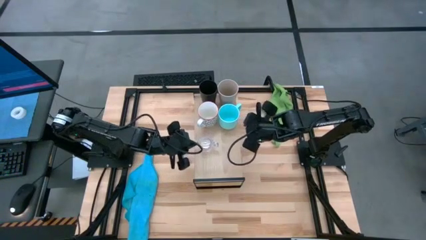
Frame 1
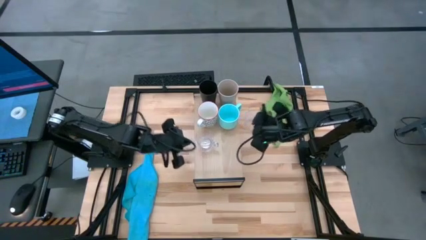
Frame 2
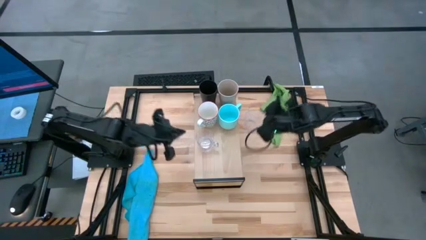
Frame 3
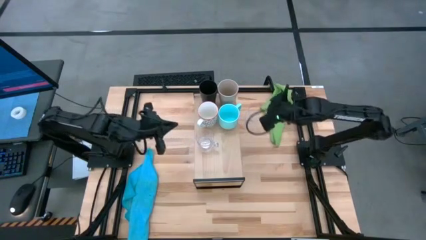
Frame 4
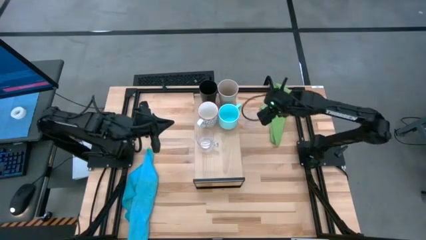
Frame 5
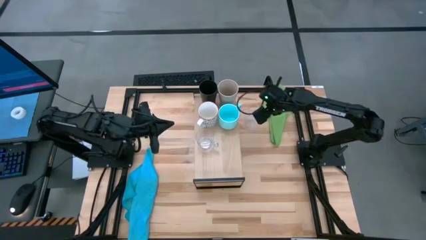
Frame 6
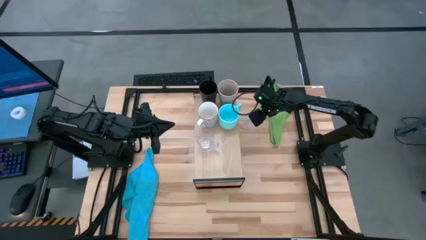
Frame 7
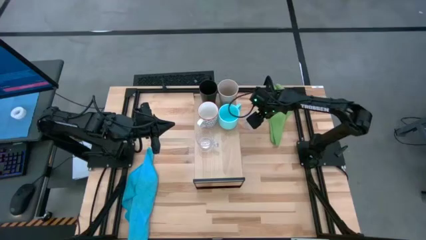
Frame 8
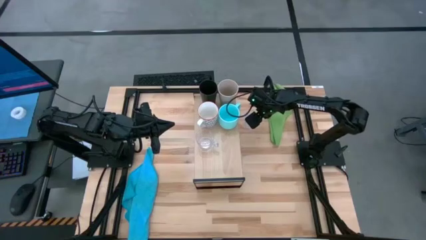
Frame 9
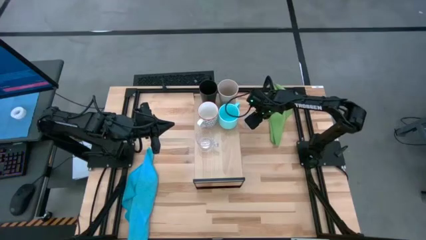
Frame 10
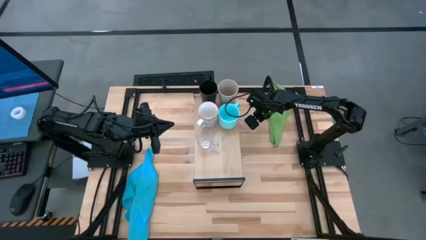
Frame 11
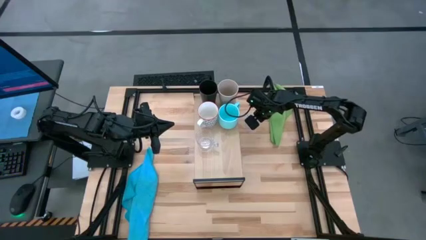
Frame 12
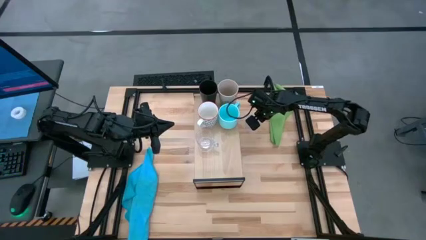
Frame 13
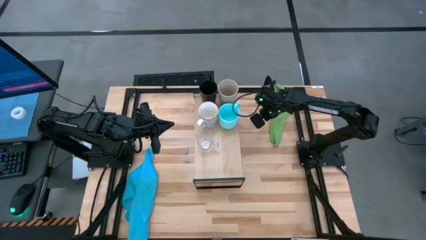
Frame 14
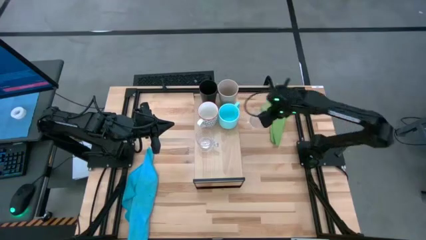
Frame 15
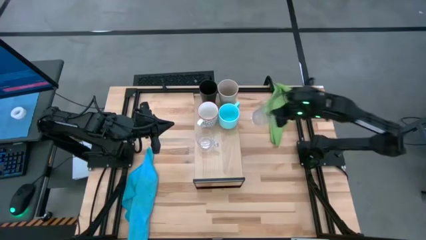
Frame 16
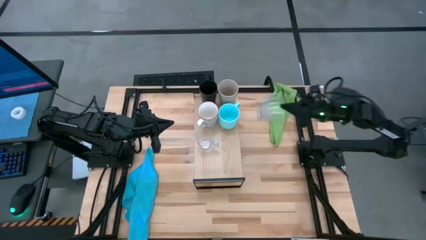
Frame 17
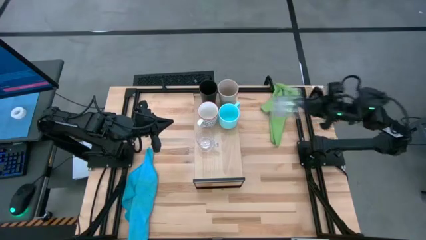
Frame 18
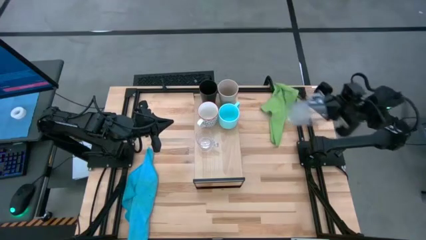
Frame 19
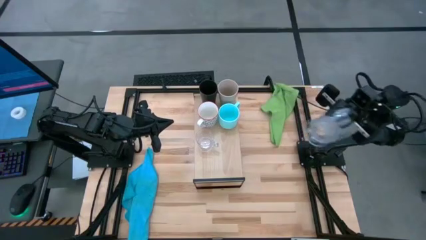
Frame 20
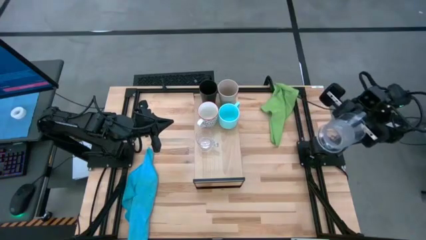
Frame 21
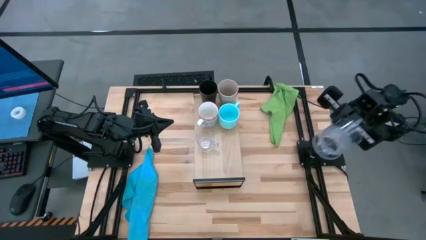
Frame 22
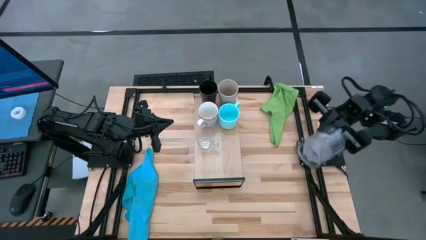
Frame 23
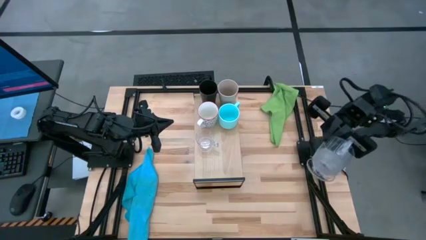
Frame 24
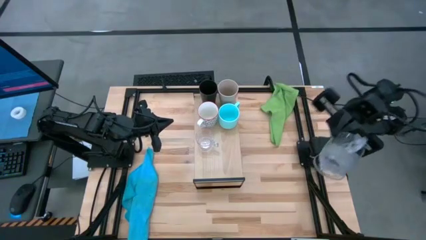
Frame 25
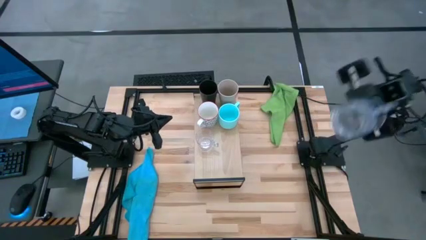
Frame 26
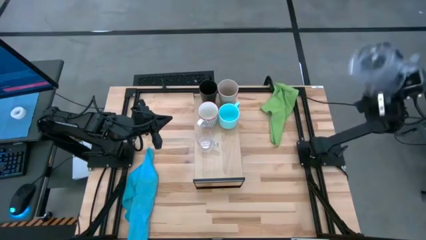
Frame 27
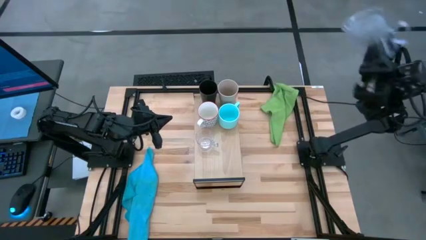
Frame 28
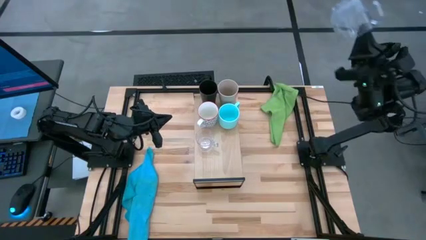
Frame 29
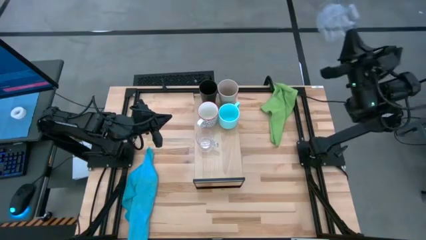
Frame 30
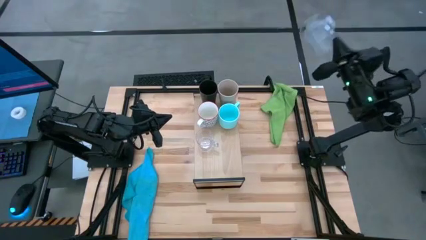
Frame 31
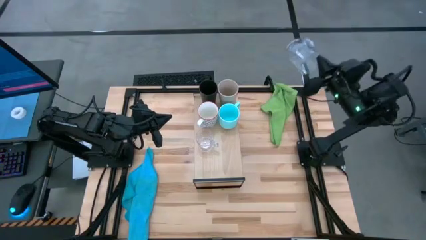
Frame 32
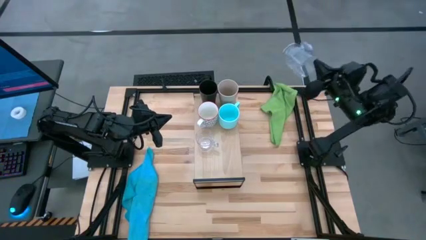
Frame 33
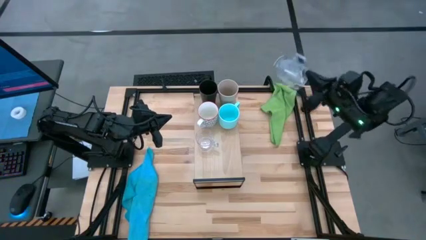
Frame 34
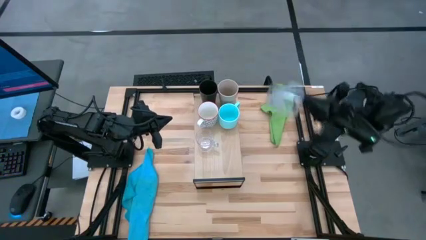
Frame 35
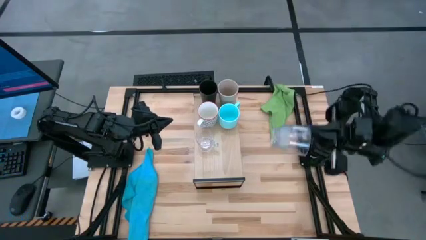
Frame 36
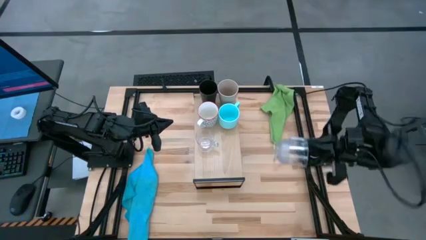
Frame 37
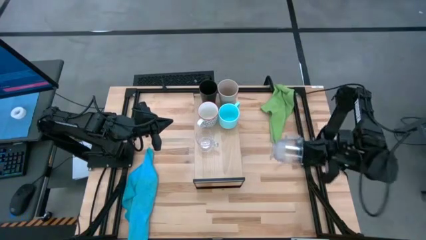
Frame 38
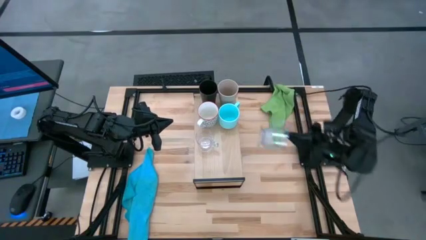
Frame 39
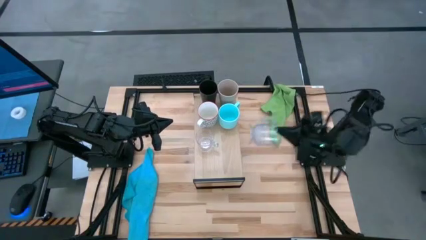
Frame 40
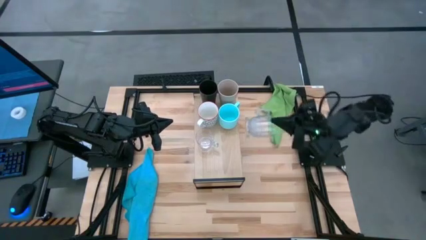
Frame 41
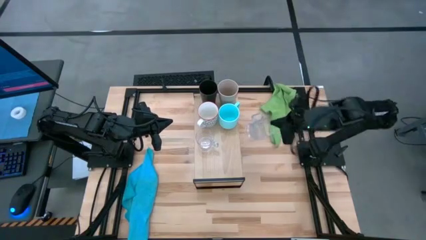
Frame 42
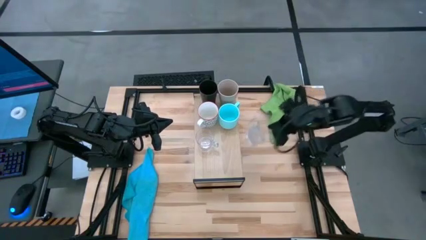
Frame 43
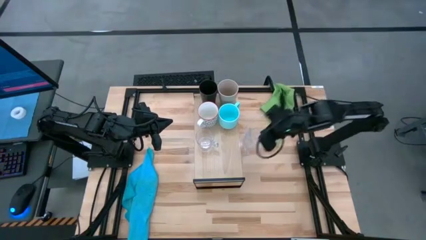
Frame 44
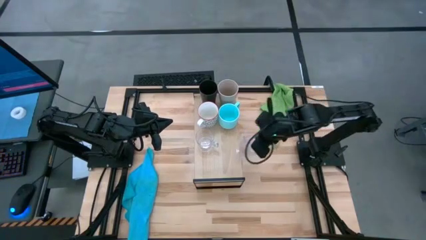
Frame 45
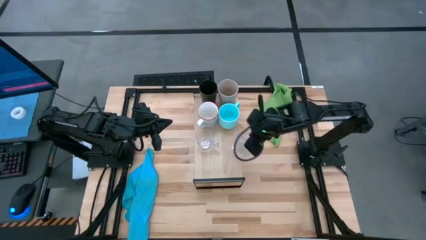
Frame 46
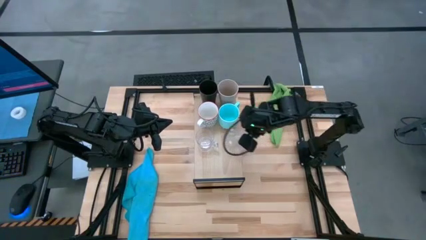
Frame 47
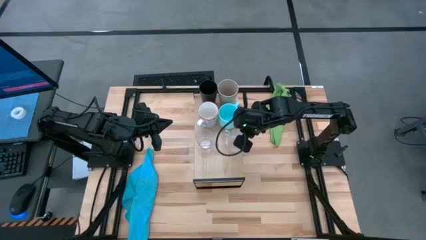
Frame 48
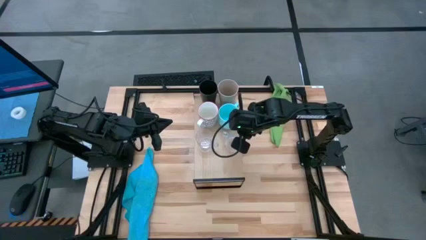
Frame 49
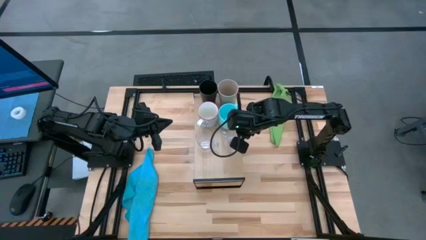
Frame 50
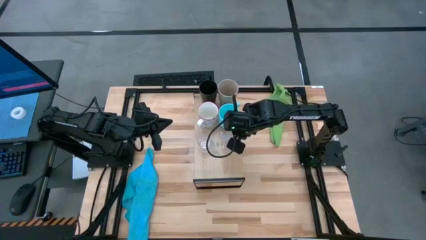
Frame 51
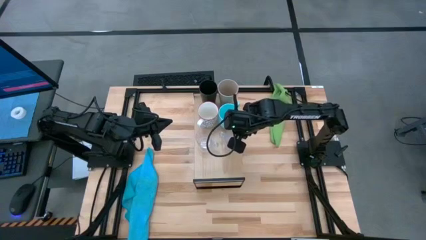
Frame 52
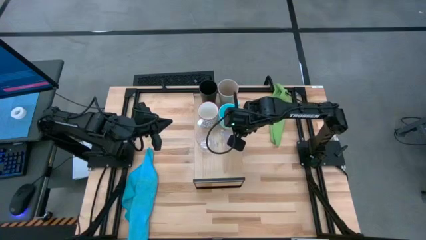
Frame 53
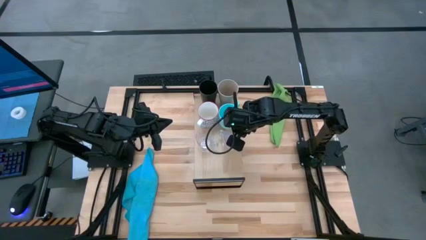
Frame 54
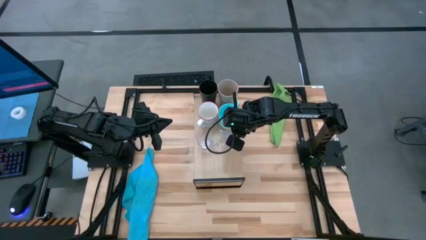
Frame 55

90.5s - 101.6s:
Task: Stack small to large cups/mugs on shelf
Put the transparent cup on the shelf

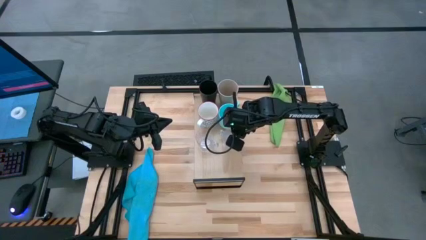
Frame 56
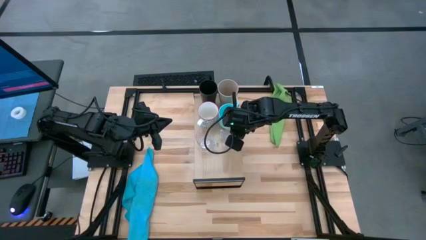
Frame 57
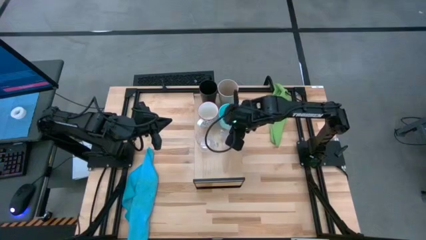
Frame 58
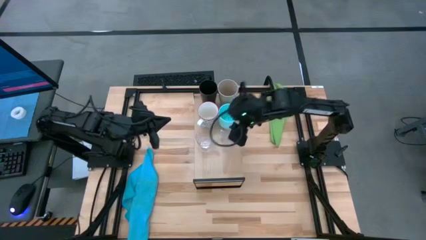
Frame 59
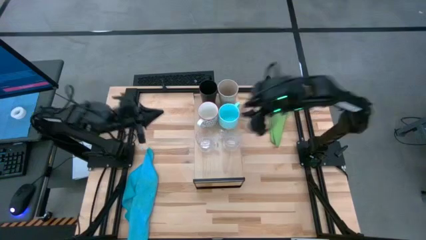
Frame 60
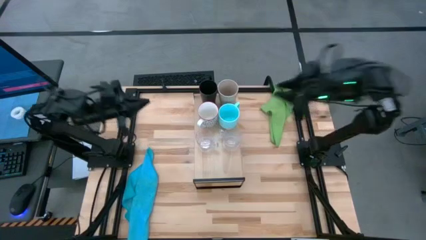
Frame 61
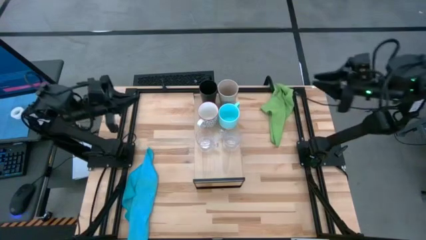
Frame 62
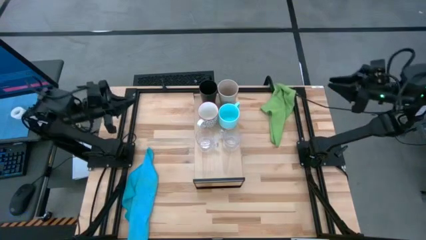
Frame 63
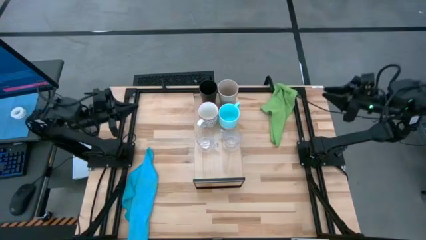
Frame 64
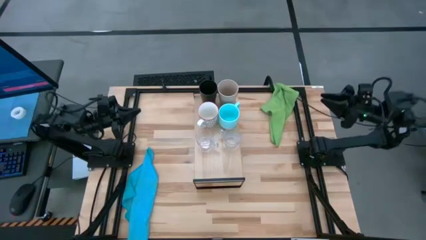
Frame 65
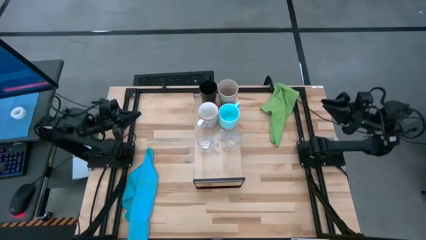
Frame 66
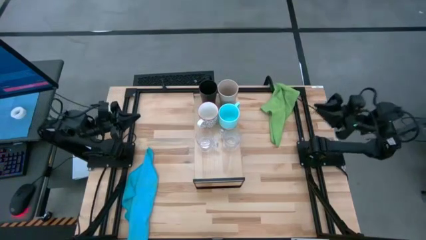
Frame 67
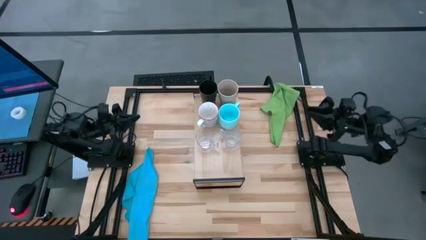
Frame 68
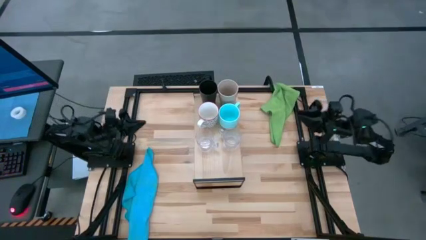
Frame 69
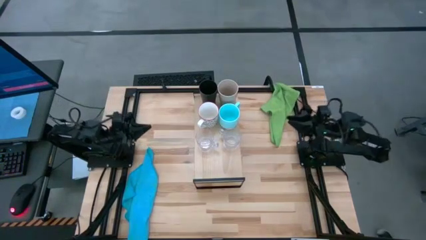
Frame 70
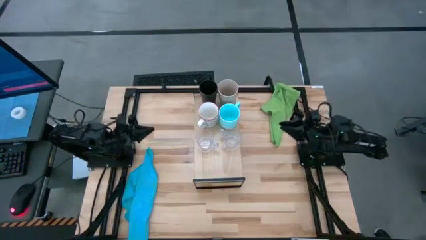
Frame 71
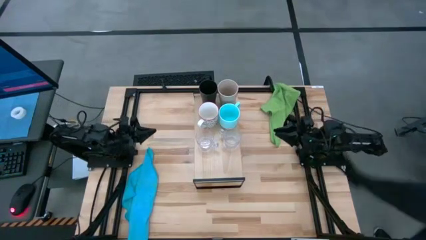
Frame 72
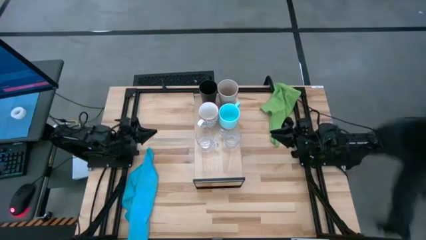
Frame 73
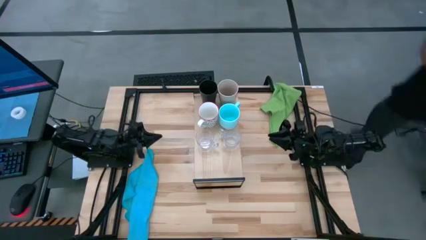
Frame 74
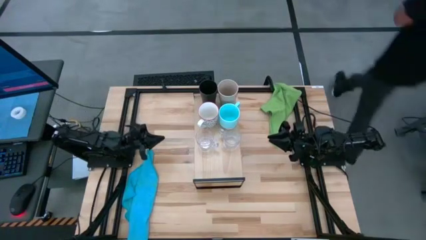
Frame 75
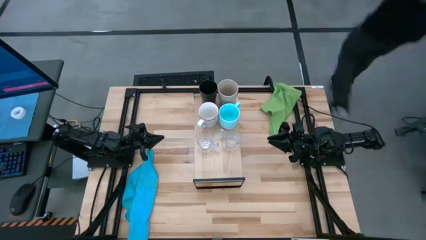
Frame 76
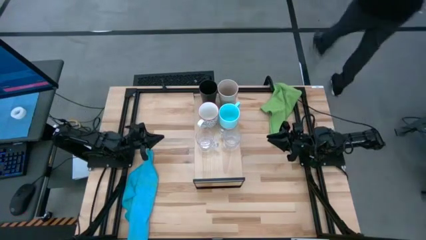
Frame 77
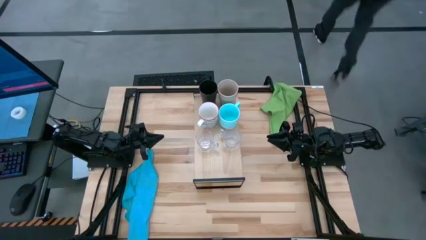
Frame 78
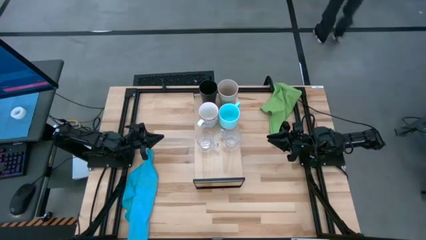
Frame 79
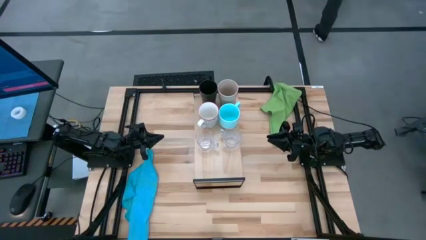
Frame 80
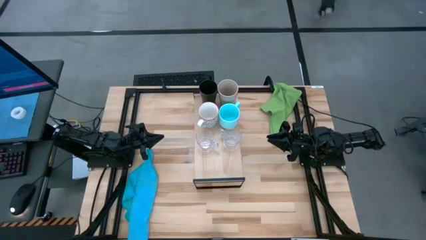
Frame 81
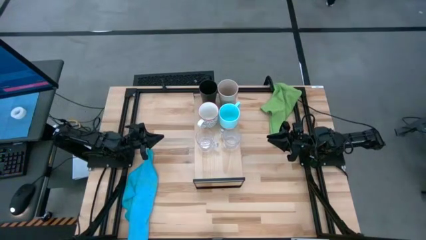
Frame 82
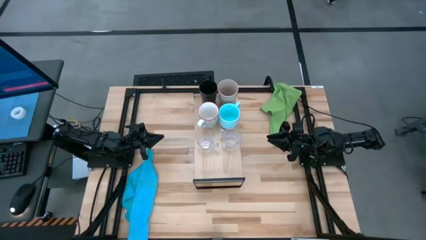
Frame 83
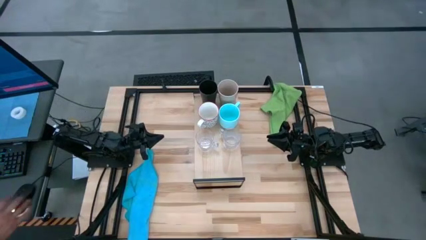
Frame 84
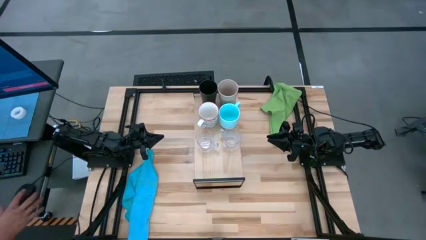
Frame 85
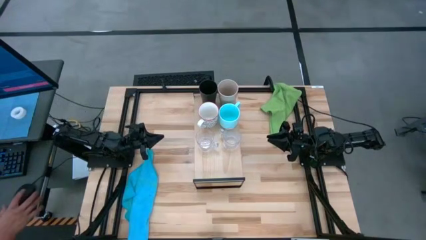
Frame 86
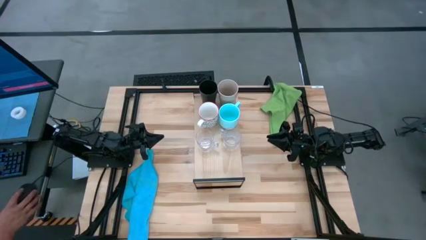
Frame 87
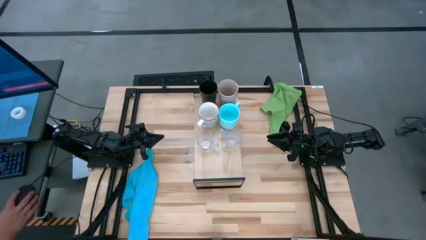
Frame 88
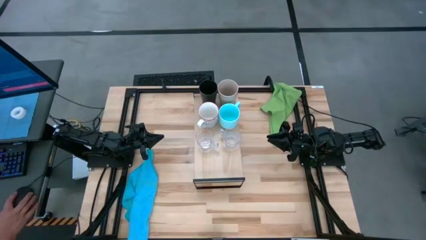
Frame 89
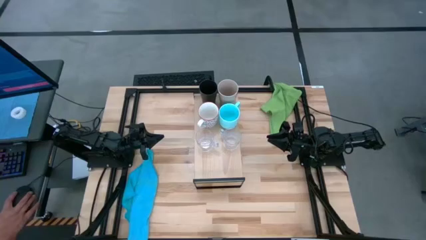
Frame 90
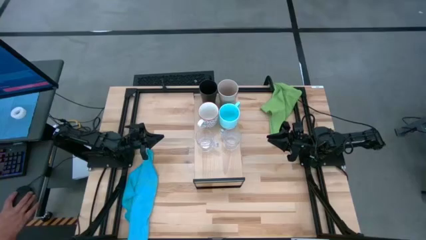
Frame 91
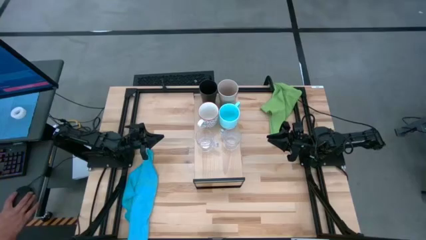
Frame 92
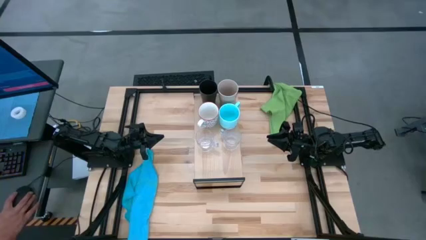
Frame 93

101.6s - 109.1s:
Return to Home Position
